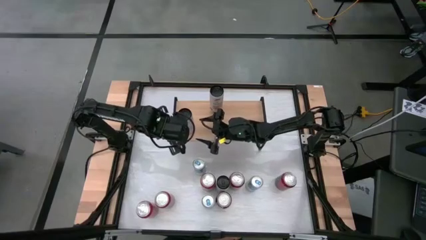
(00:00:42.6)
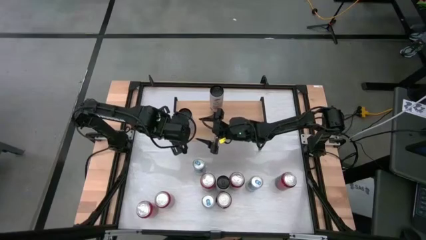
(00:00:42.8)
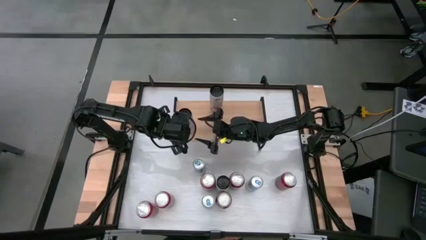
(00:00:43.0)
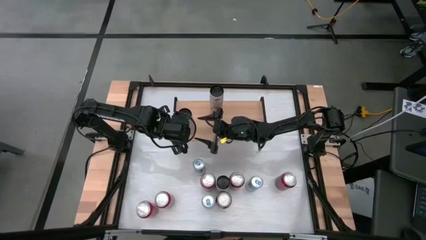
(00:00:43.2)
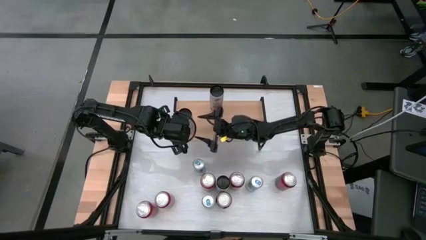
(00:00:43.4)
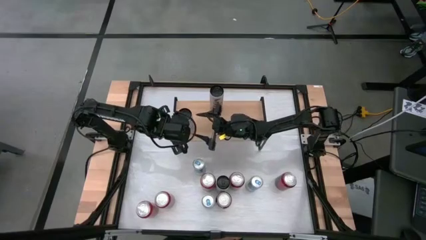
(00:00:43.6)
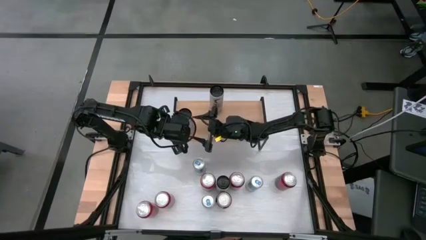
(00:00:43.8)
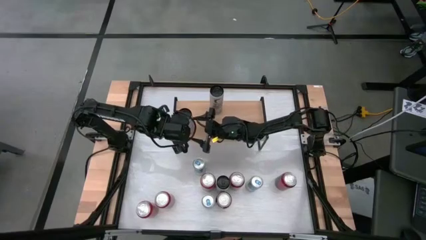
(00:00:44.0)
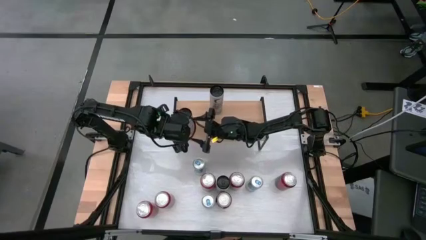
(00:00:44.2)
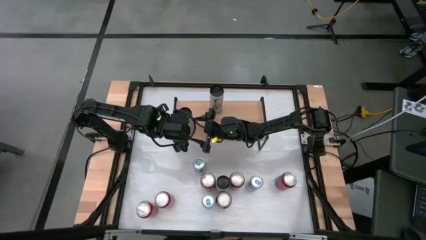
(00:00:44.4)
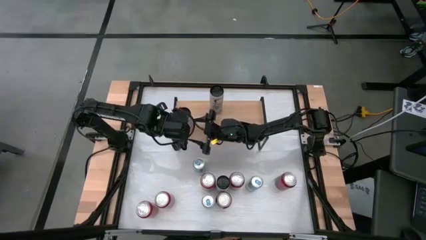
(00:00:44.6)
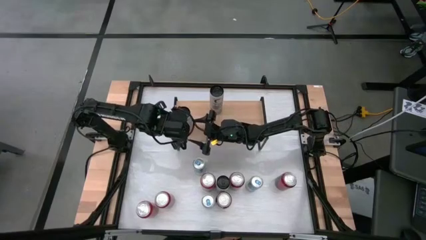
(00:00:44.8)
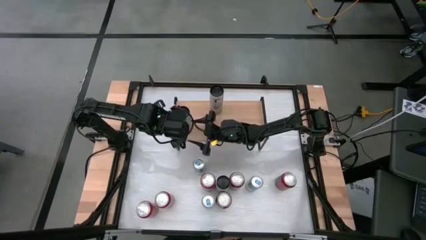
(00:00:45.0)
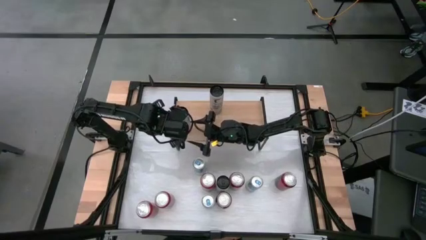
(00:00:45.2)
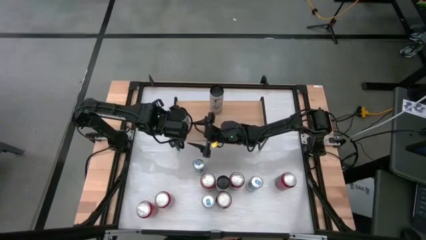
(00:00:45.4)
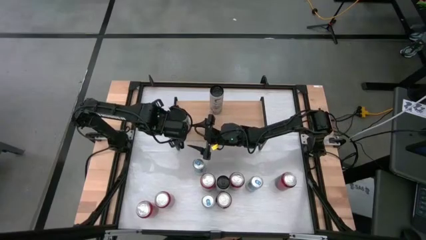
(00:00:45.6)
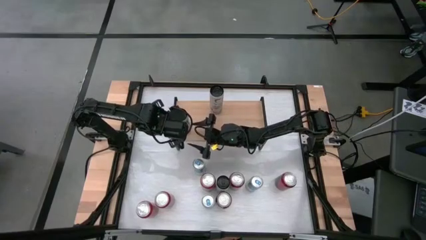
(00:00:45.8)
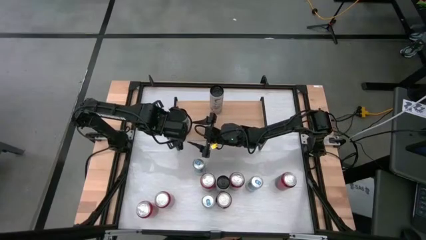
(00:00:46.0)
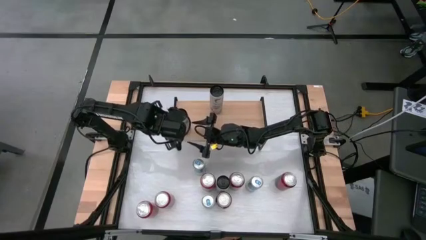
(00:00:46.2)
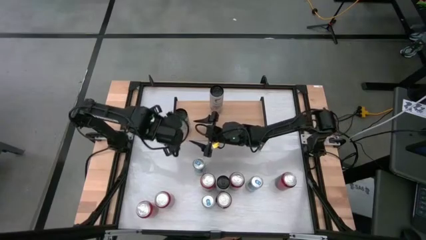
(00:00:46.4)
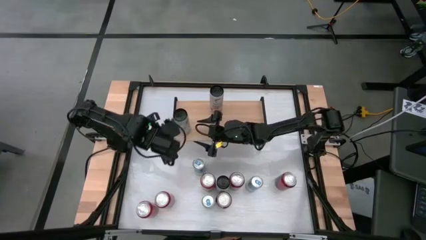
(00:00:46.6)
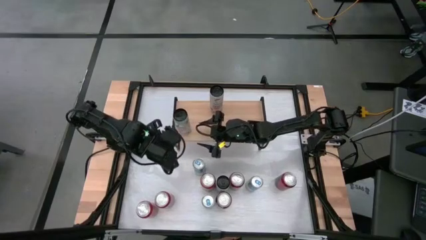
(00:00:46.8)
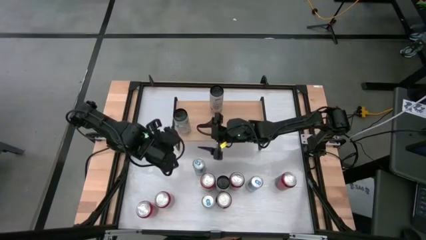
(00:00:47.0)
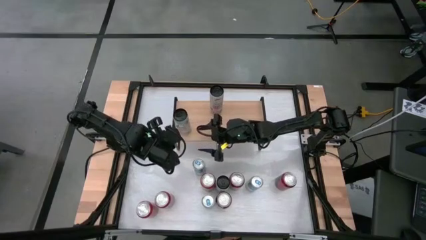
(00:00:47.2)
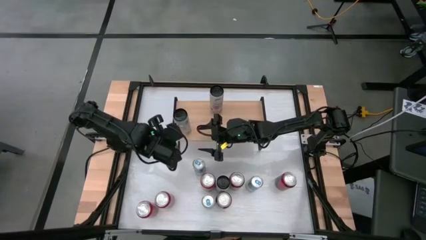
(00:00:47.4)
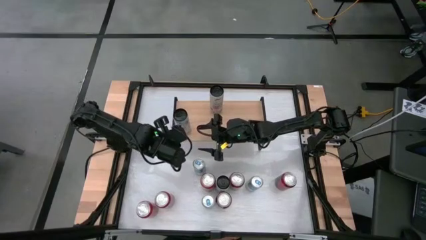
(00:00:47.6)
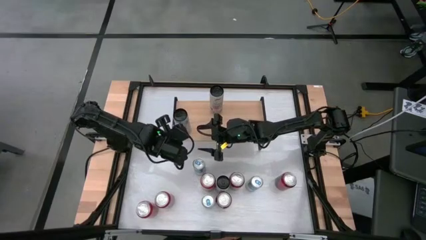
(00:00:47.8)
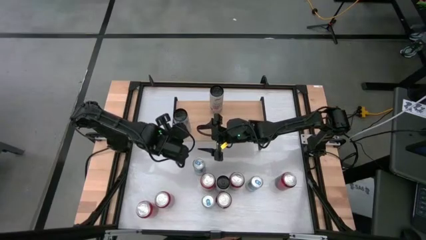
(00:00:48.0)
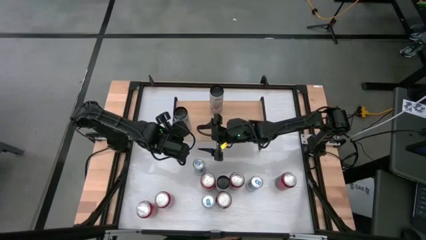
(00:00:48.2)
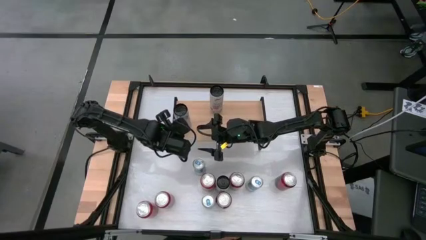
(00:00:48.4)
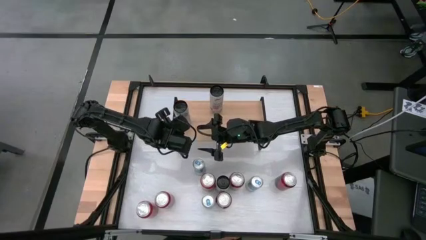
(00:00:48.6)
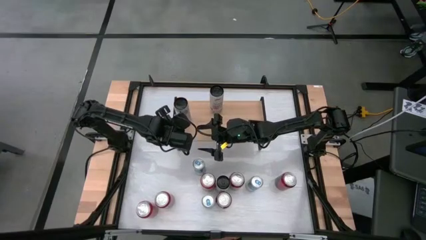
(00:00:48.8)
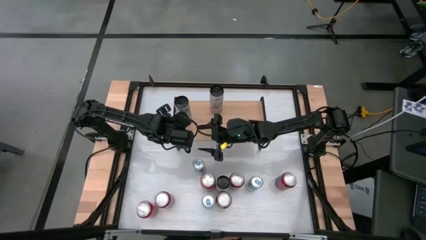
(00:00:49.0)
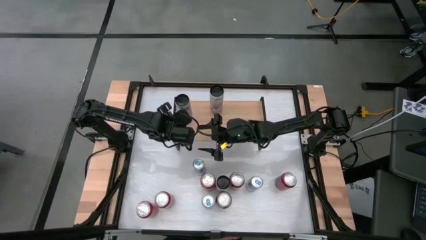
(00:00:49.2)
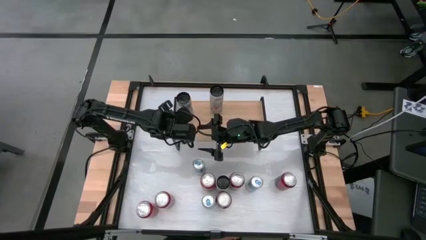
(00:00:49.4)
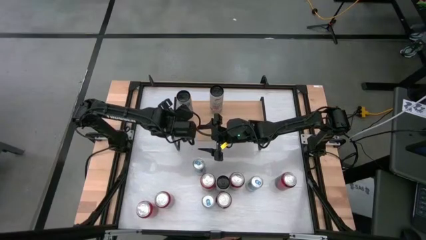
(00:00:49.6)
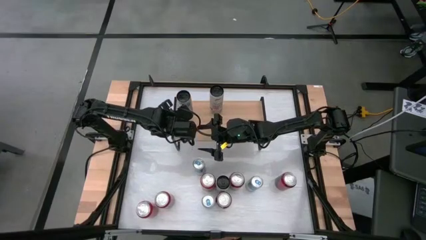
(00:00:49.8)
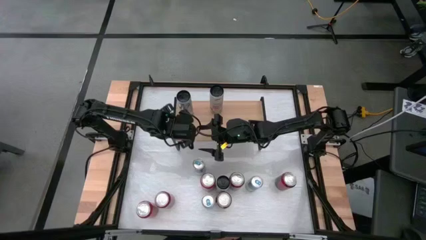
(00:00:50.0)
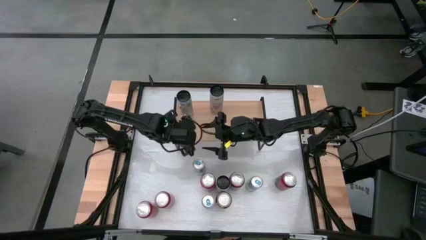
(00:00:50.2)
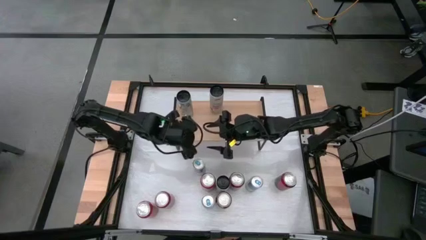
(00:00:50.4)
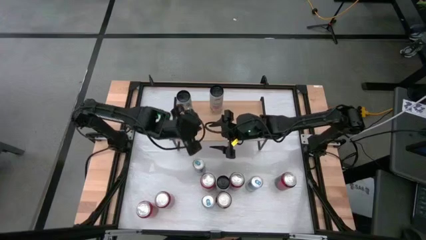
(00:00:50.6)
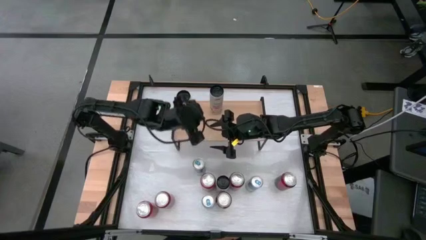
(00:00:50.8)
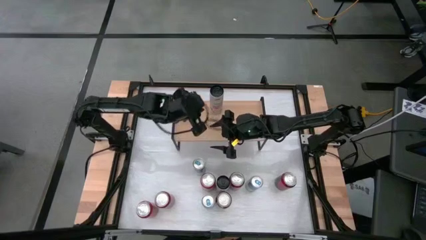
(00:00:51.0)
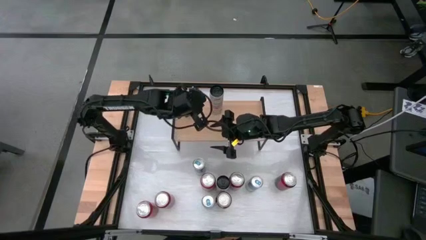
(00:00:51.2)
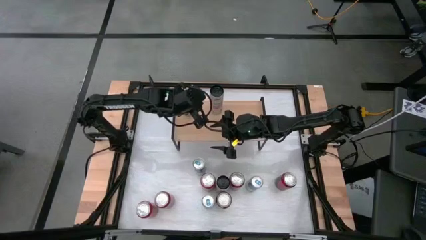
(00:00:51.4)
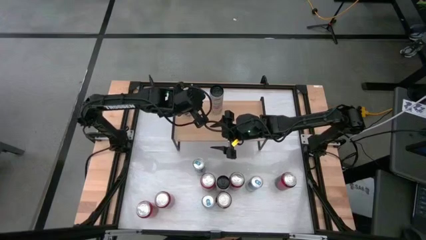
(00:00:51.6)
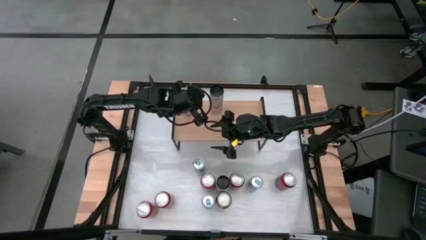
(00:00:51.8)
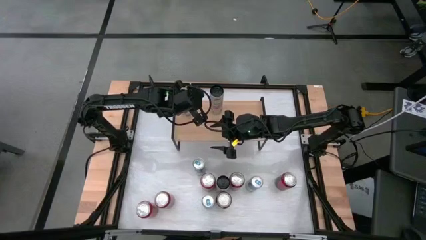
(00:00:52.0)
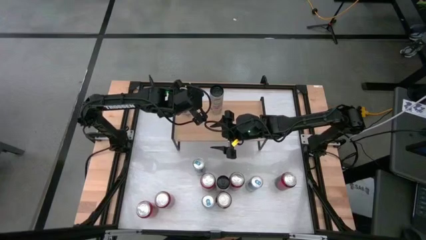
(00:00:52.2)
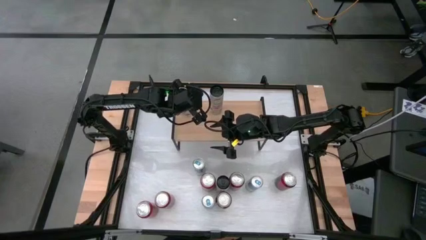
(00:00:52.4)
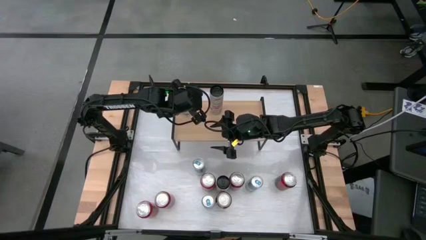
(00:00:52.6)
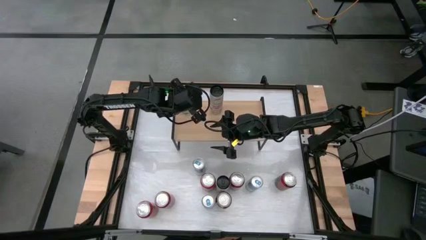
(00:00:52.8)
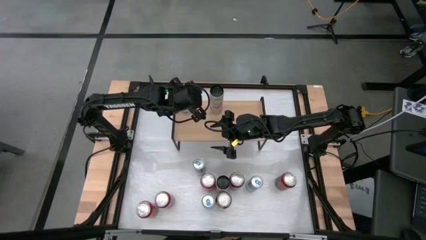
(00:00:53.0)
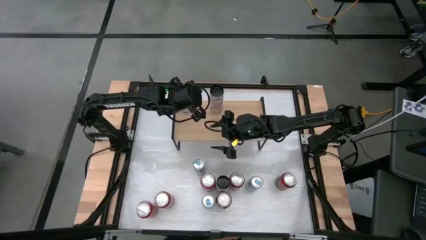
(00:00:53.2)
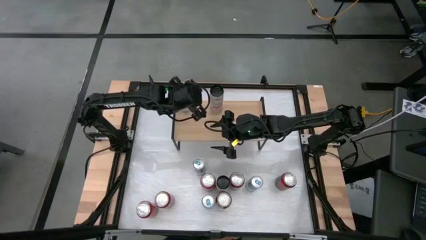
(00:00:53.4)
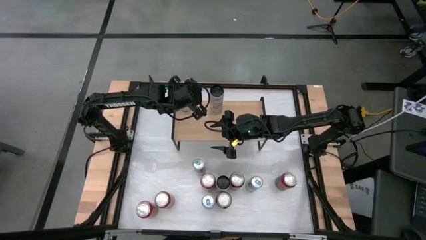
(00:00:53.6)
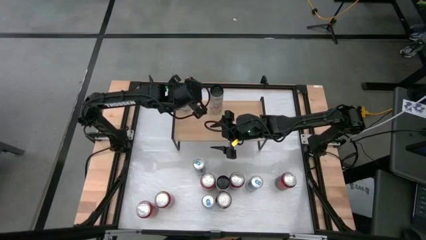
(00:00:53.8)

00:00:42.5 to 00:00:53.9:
Task: Place canned beverage on shelf
Put the left white soda can on the shelf

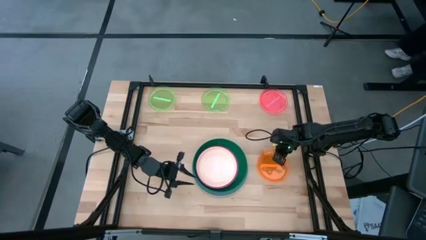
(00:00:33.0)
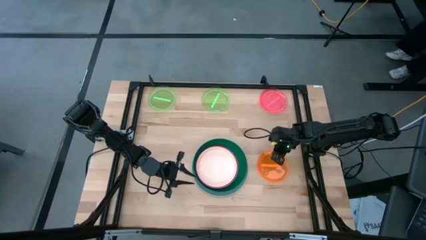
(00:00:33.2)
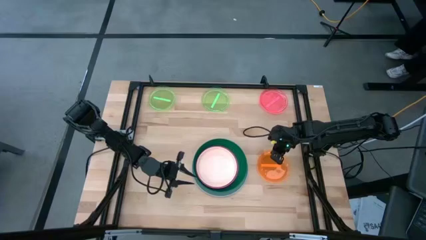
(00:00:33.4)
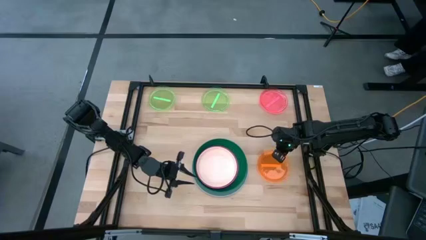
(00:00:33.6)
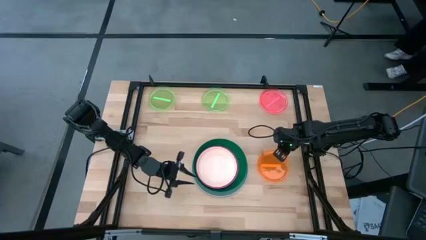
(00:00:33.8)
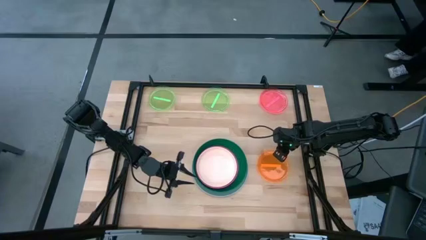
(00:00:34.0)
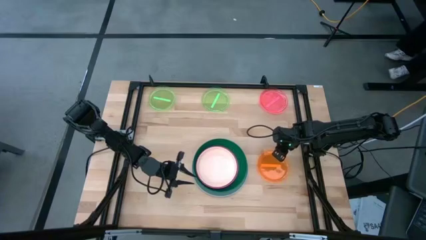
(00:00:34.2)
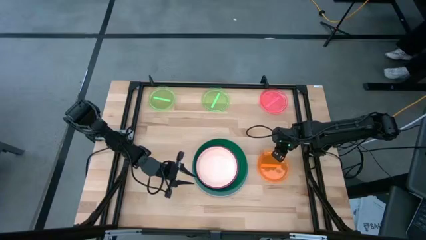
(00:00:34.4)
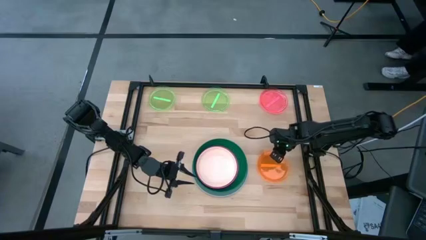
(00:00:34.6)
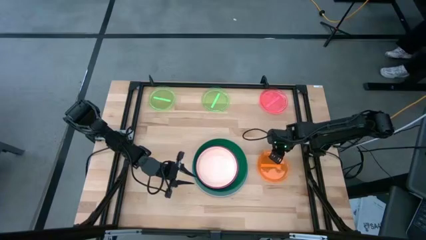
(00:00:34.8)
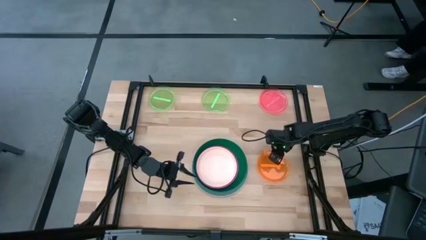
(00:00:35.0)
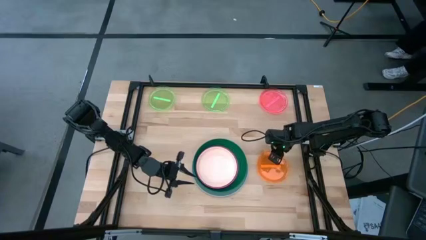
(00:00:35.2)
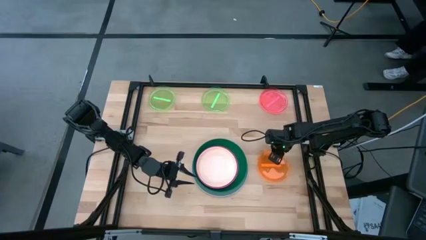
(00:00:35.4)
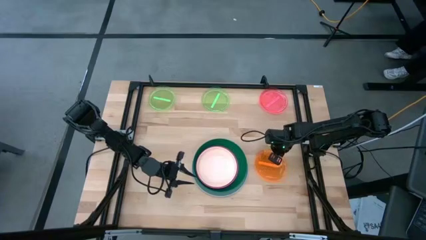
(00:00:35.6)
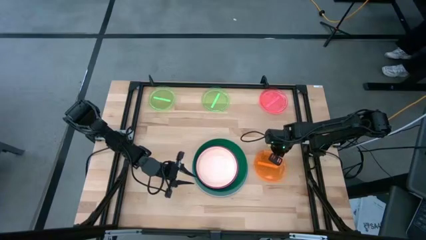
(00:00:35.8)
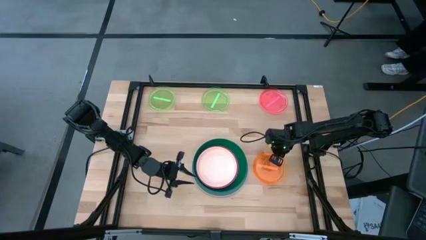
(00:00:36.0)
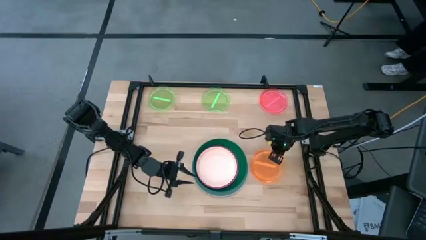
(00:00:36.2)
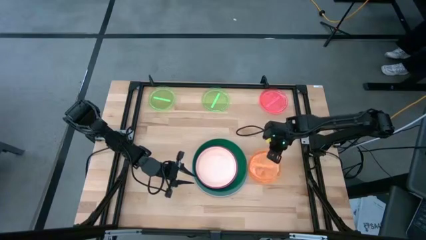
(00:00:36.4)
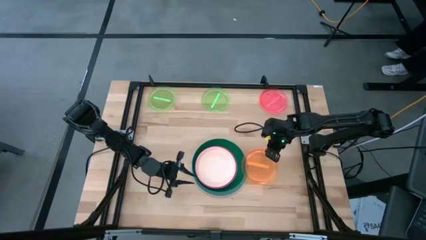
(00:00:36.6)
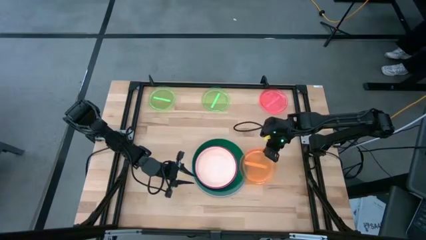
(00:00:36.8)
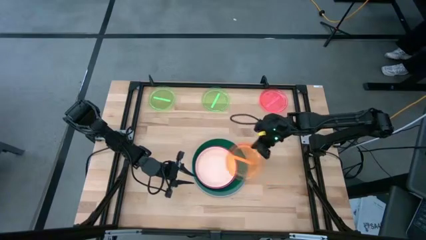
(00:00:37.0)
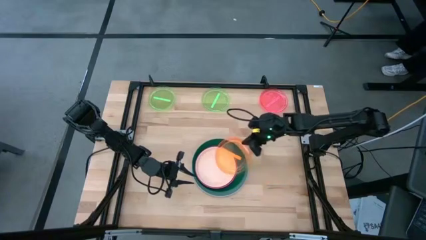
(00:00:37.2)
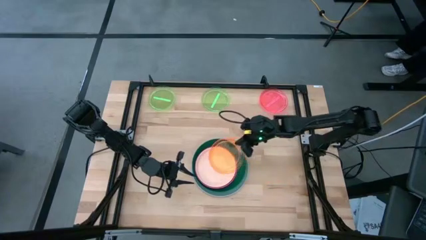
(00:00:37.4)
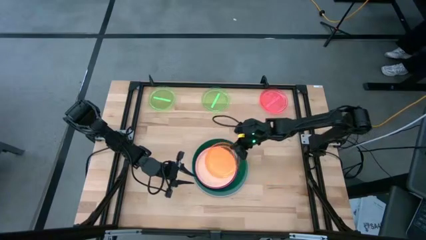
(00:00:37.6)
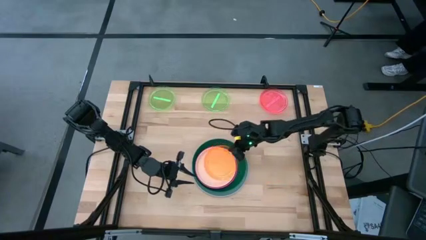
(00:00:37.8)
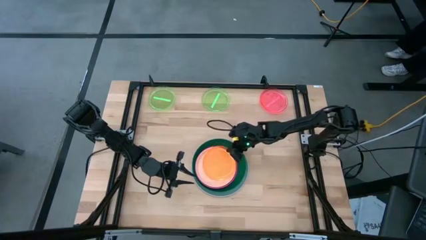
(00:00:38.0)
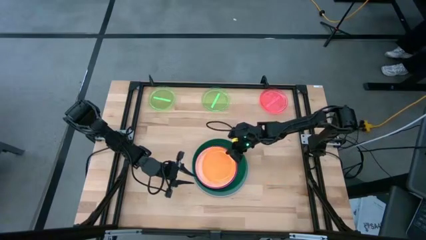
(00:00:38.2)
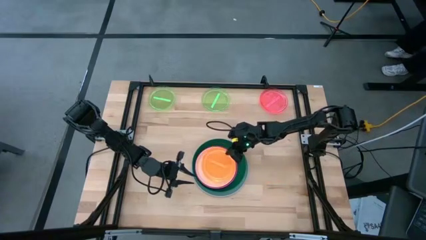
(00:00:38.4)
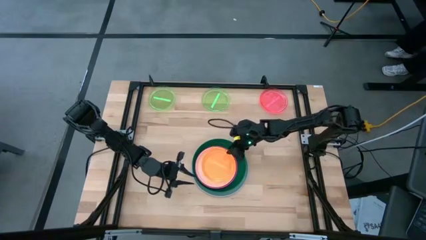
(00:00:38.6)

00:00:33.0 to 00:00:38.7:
Task: Stack plastic plates
Stack the orange transparent plate on top of the light brown plate
